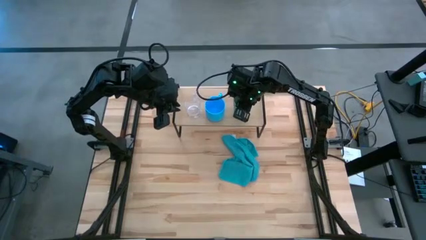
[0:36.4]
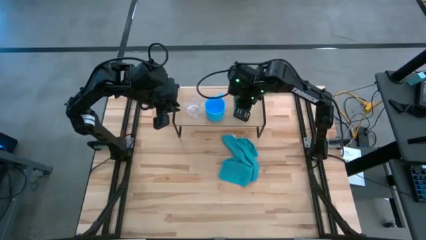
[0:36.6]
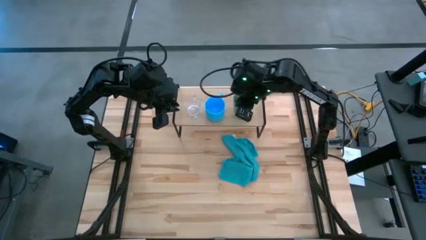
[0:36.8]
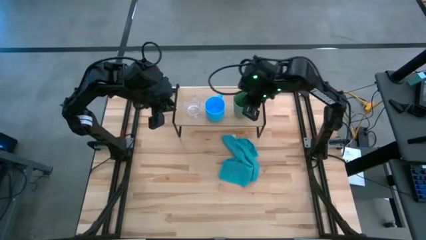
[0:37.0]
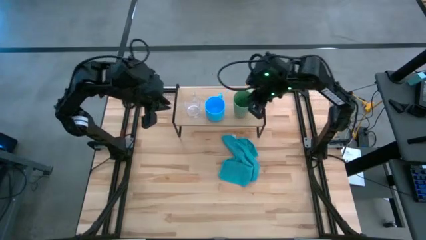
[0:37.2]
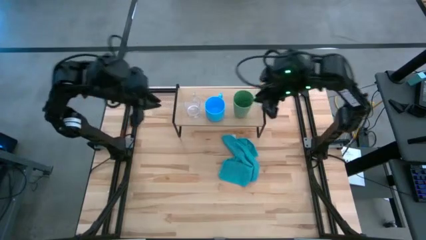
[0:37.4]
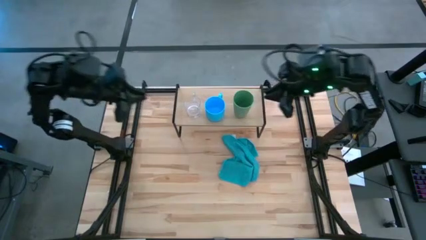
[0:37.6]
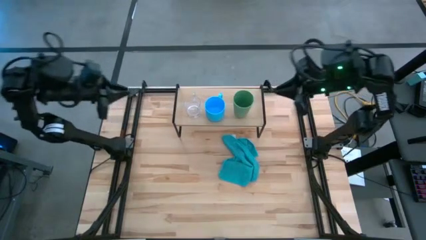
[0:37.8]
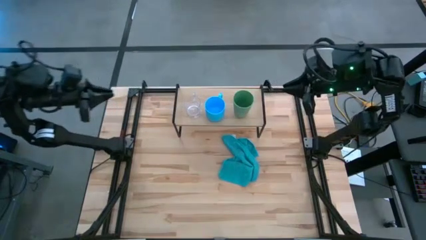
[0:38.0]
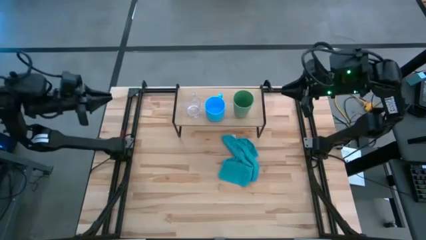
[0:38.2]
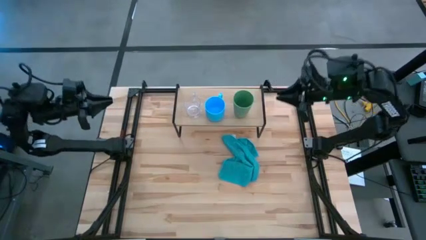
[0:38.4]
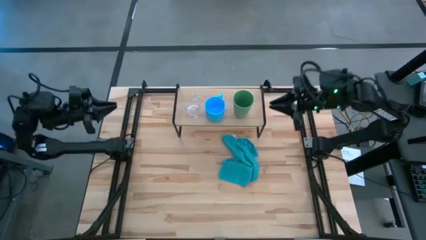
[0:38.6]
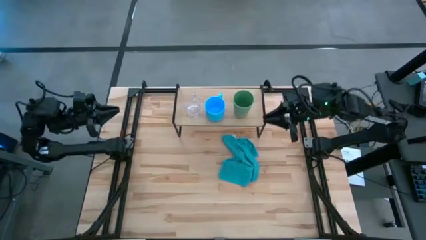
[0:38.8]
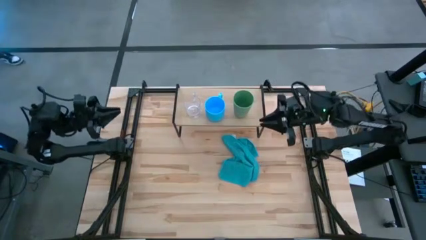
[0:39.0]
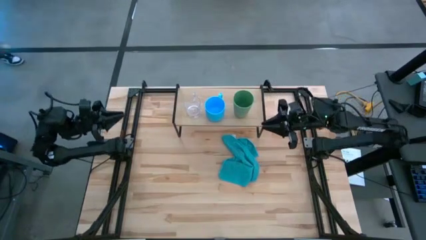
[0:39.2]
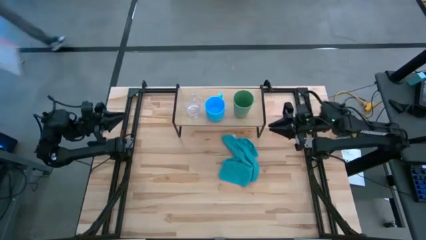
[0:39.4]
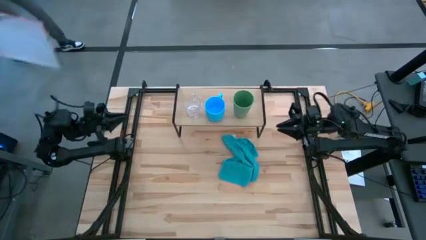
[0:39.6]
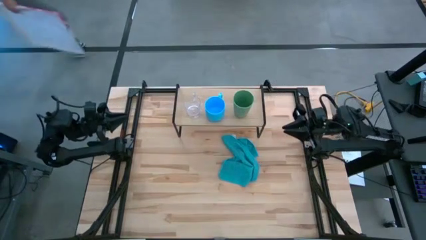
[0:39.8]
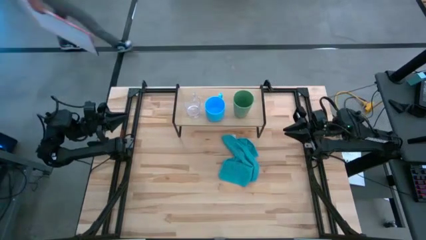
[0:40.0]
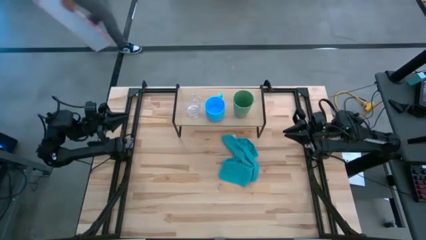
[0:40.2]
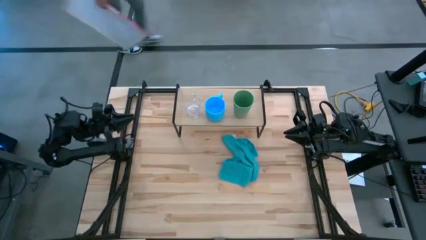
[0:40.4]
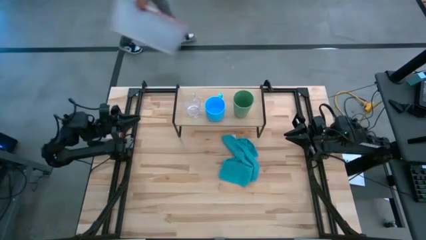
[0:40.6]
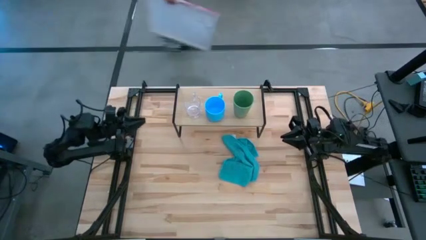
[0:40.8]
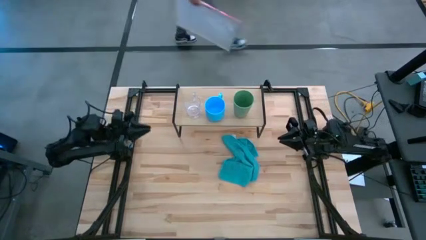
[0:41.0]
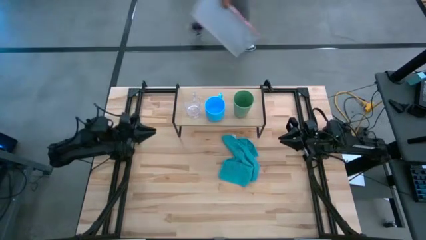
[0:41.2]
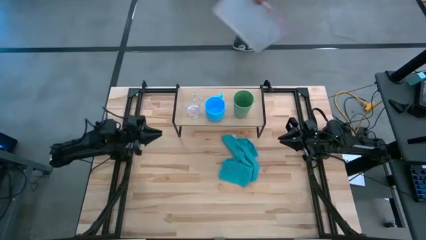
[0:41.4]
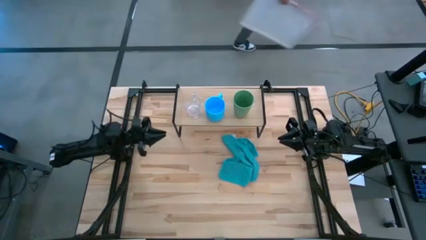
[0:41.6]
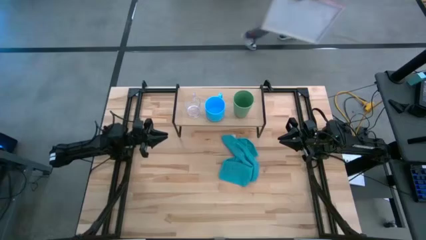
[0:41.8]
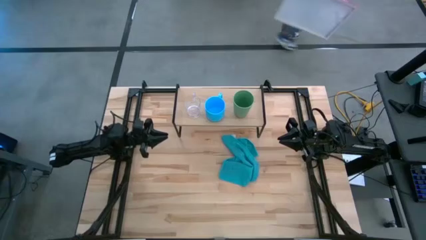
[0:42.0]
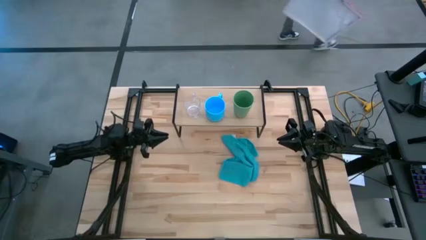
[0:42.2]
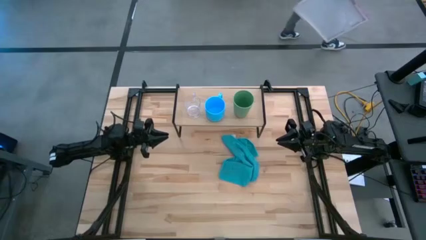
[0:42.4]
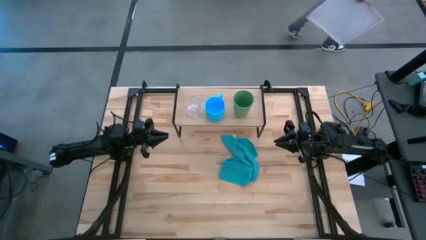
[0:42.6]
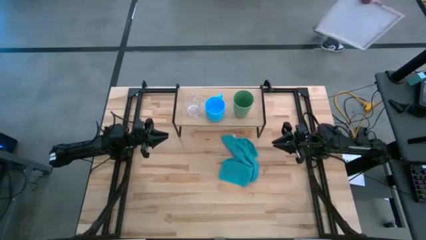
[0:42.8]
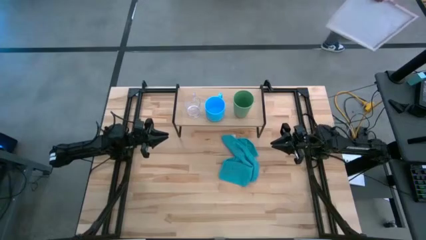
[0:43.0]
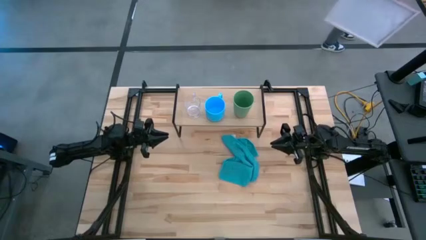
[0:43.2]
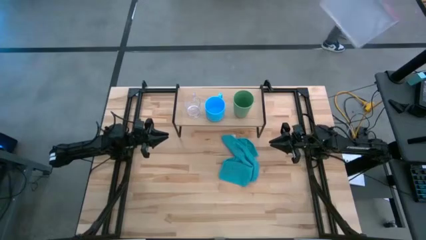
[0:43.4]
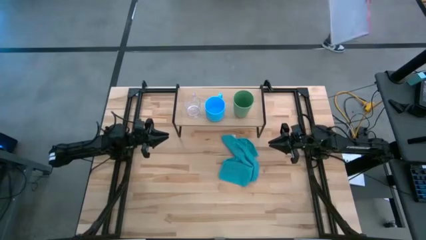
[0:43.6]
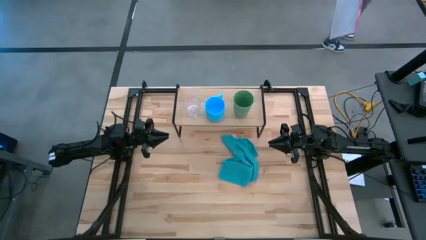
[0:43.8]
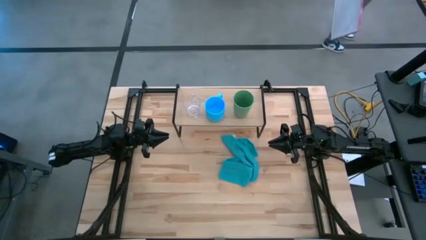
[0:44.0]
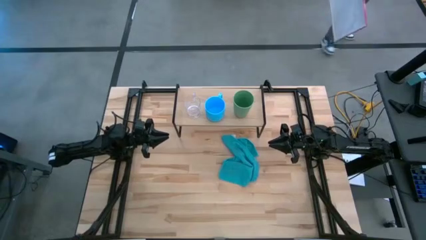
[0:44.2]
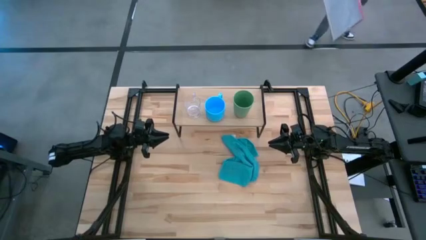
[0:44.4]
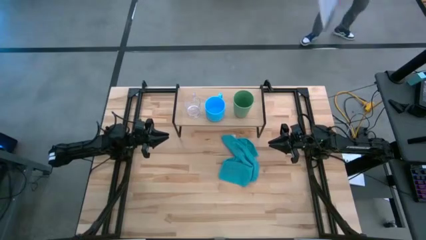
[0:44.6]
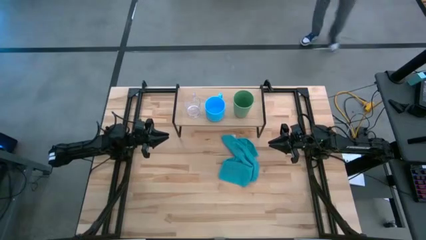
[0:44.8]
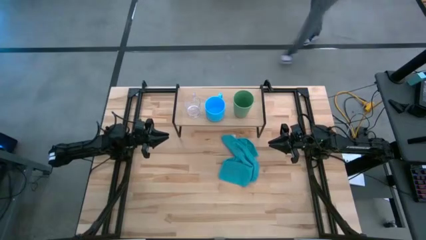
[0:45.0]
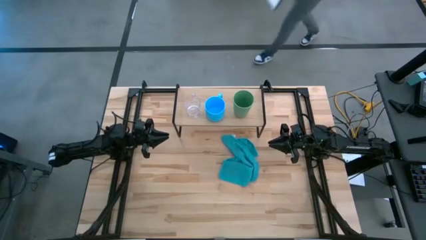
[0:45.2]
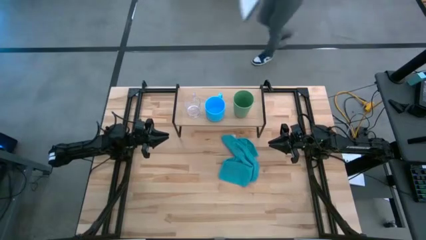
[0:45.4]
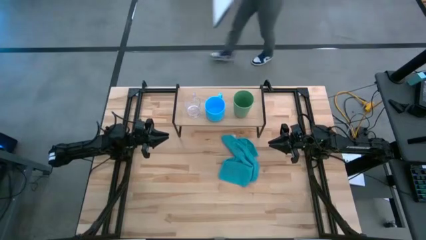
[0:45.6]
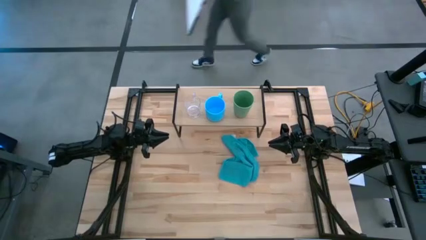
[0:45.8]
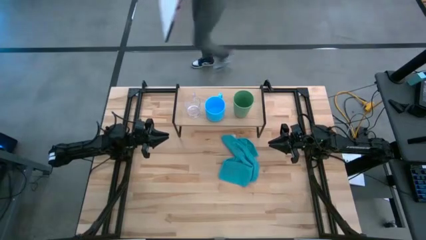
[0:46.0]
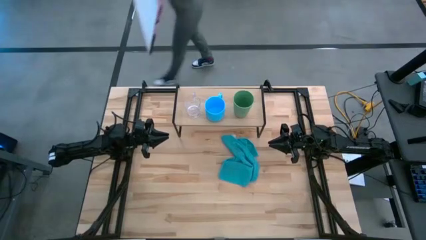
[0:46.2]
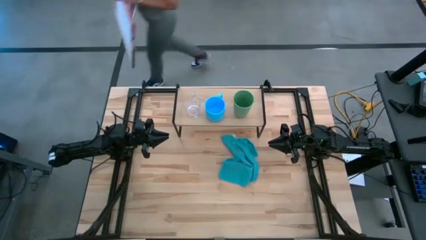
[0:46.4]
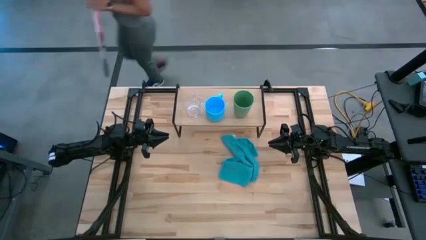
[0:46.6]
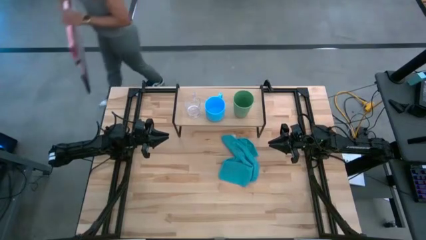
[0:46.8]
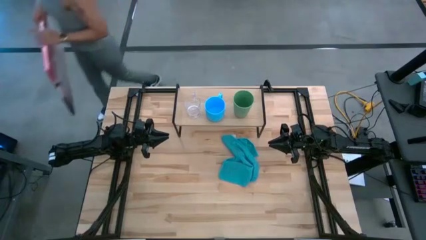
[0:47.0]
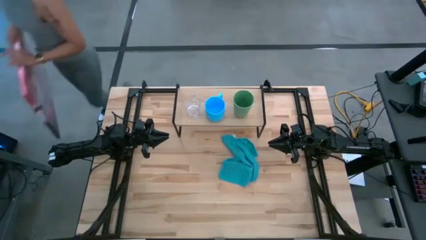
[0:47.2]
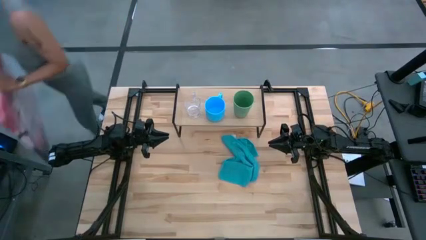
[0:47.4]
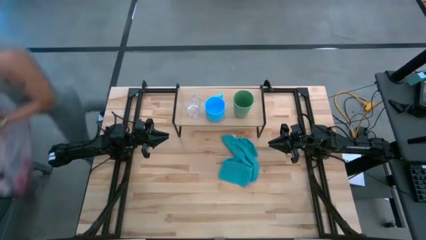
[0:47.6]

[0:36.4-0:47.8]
Task: Stack small to large cups/mugs on shelf
Return to Home Position

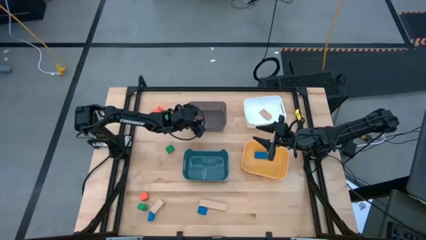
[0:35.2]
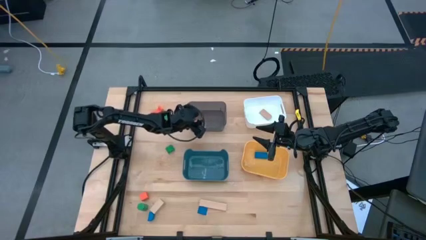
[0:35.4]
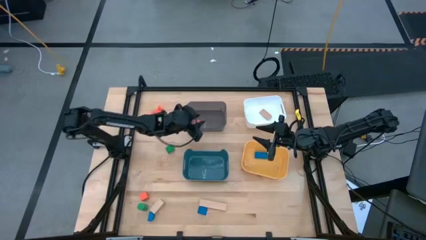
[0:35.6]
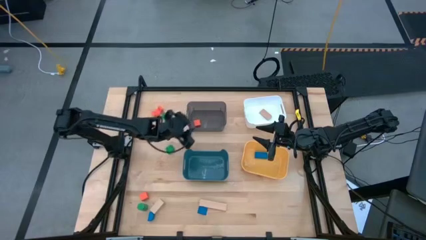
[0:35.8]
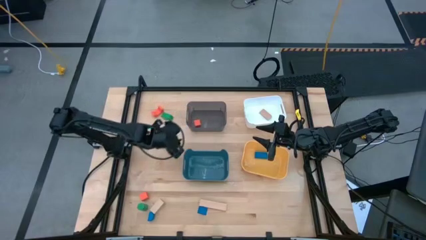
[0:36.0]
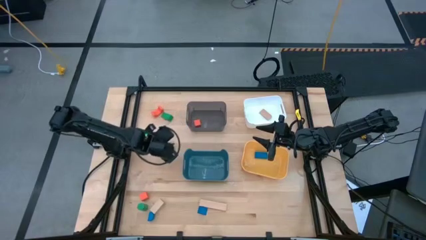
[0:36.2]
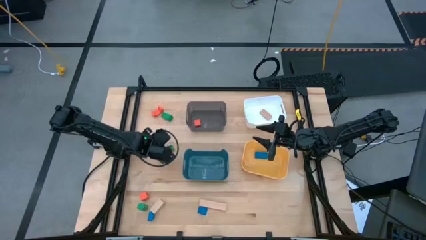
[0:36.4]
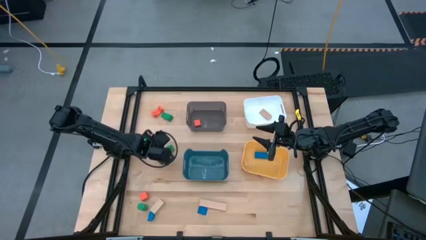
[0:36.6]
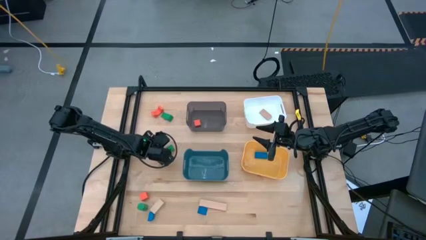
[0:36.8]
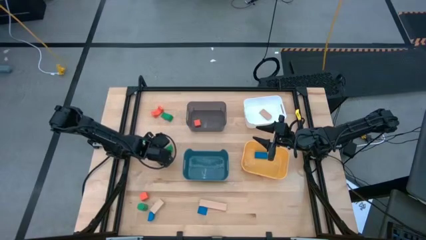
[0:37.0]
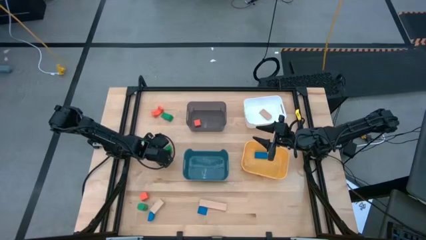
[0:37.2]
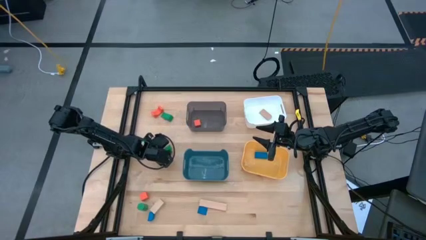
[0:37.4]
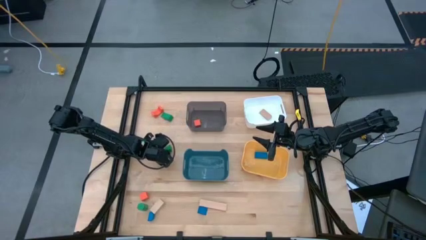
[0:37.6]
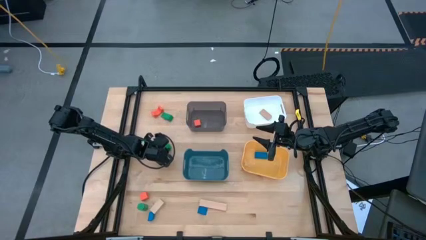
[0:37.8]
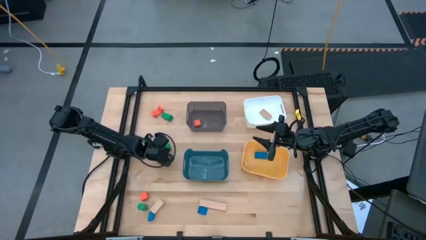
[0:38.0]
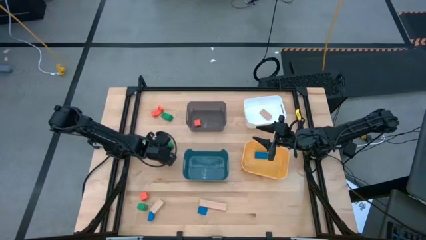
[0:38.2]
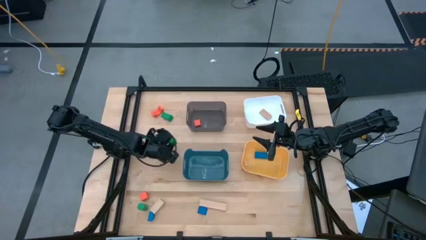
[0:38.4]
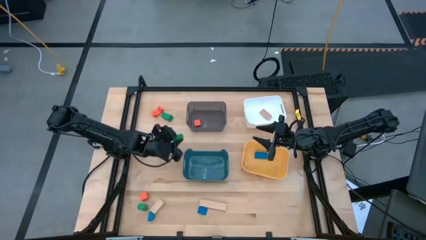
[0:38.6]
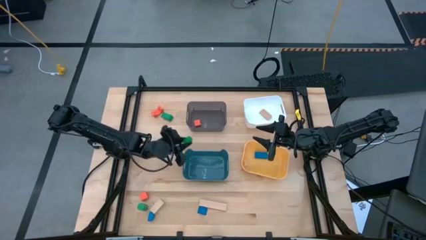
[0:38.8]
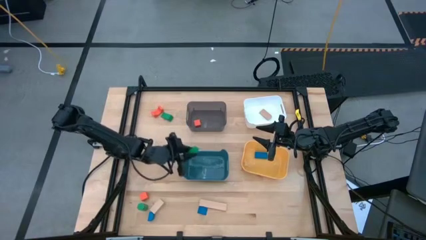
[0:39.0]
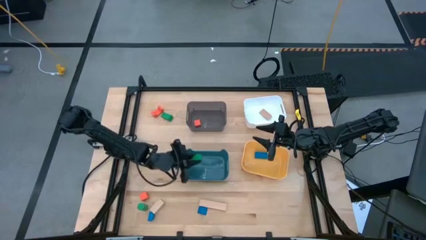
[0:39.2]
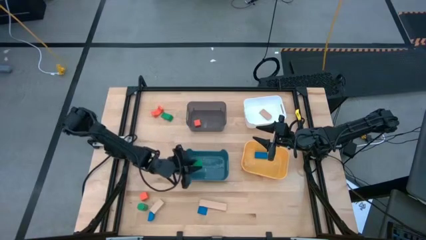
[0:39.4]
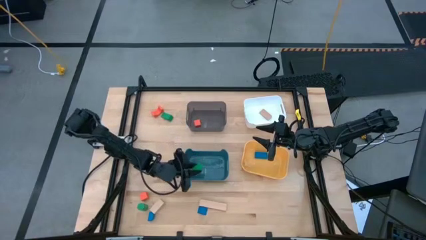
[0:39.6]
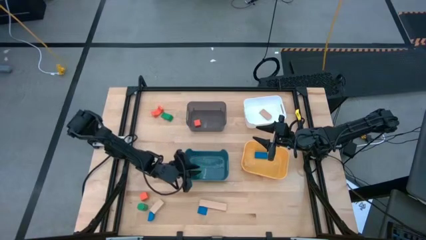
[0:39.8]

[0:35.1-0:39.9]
Task: Sort & place blocks by color
Put the middle green block into the blue bin
